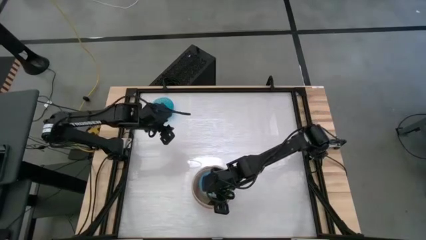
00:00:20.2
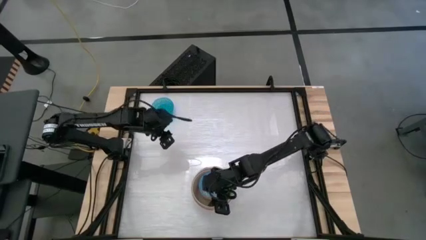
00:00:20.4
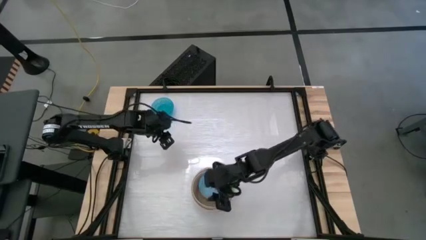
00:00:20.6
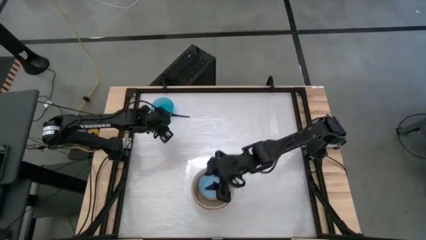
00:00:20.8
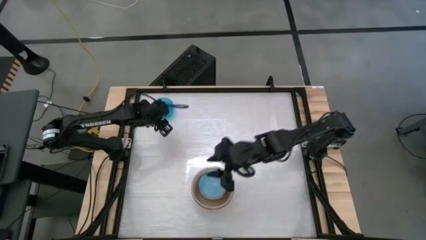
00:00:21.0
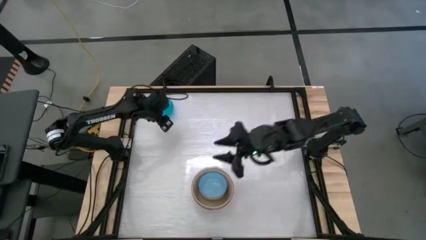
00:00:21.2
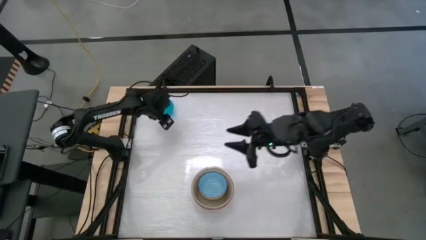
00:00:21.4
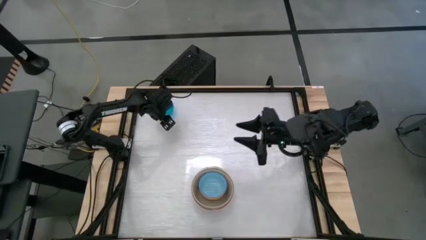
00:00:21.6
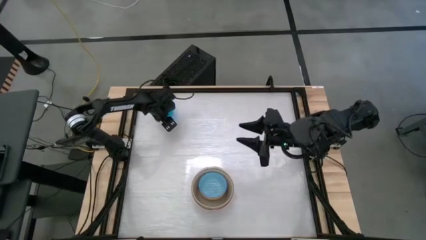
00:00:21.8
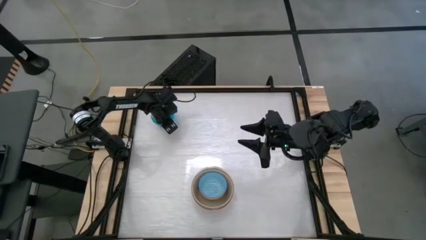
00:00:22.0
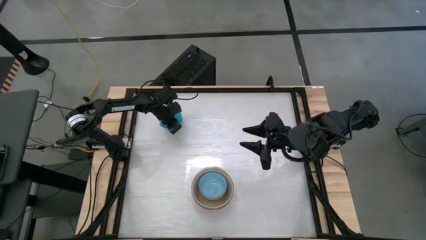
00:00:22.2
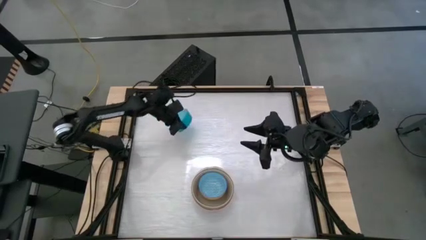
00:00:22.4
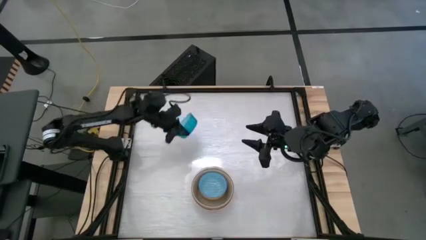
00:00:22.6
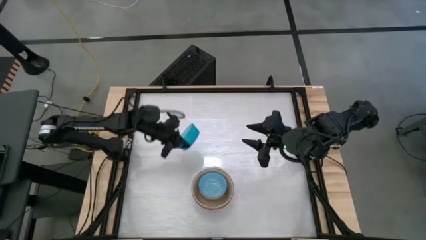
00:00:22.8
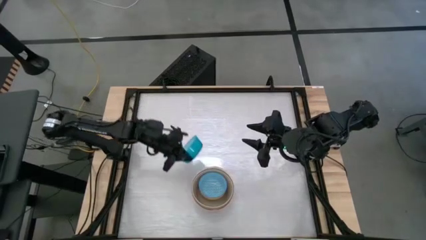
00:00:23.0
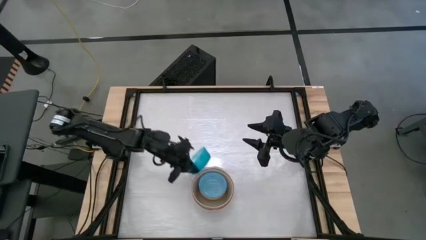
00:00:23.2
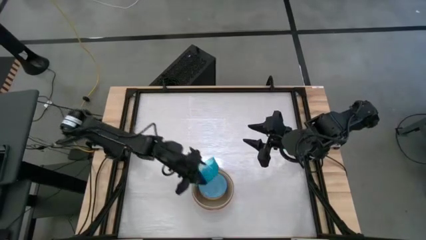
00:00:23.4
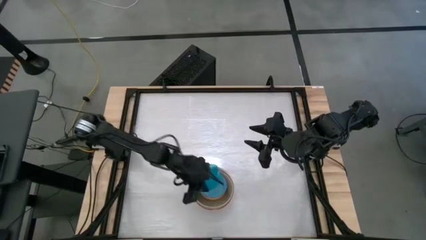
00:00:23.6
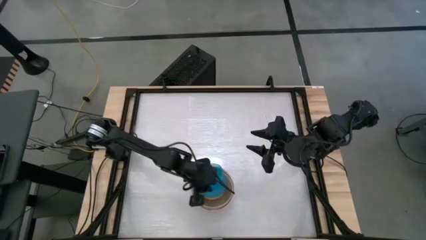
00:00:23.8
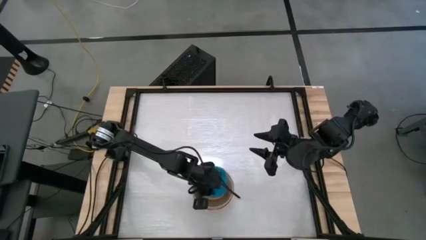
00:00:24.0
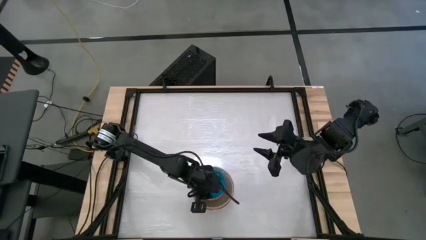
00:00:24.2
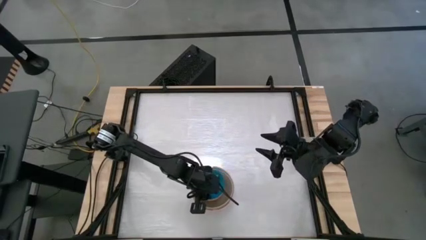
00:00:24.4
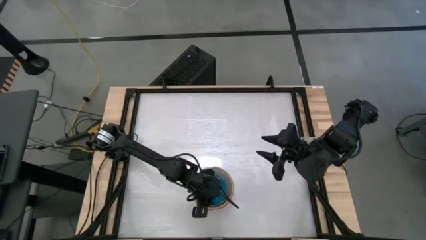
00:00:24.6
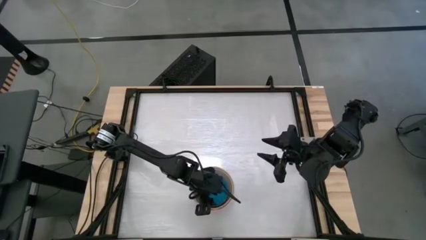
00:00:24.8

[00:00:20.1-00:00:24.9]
Stack the blue bowl on top of the blue bowl

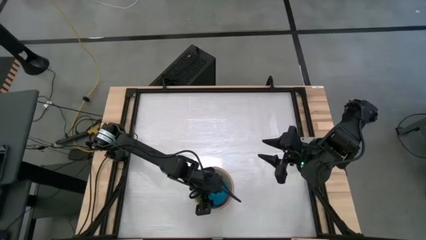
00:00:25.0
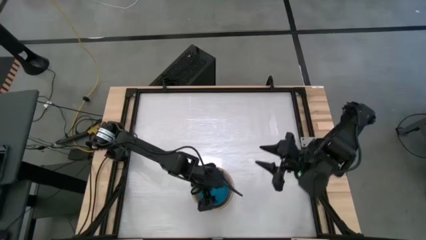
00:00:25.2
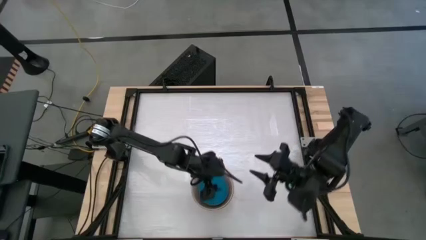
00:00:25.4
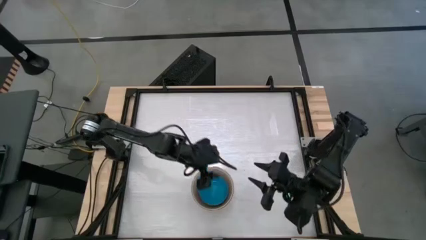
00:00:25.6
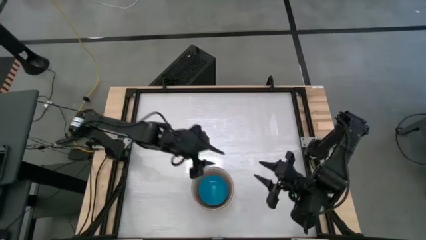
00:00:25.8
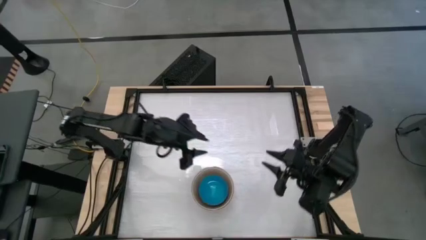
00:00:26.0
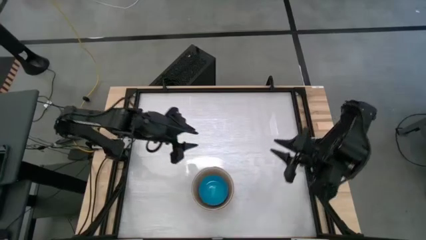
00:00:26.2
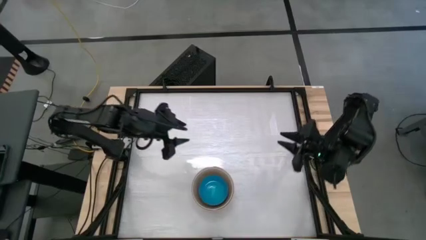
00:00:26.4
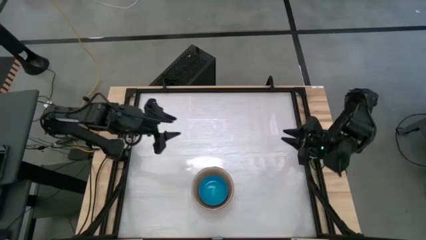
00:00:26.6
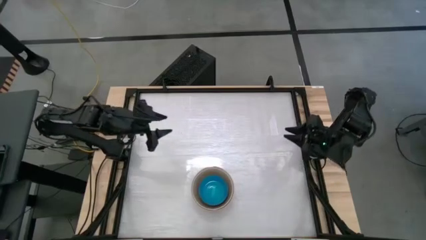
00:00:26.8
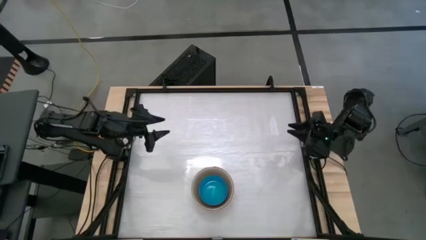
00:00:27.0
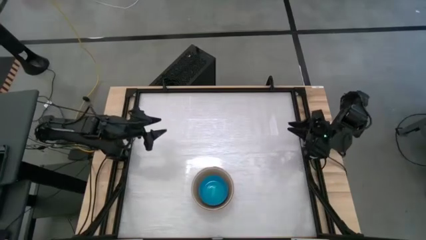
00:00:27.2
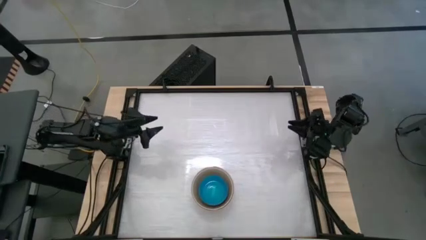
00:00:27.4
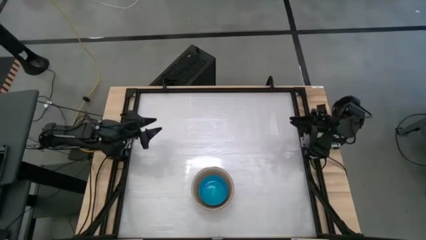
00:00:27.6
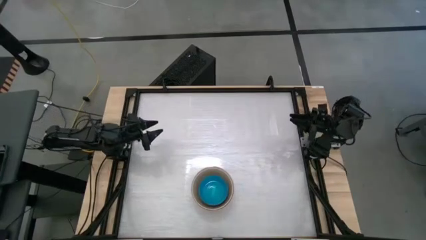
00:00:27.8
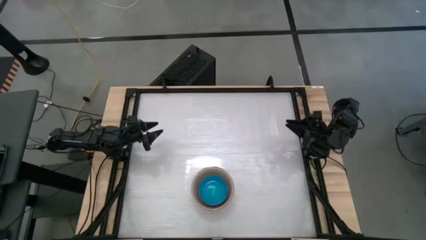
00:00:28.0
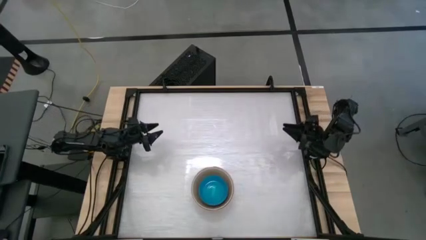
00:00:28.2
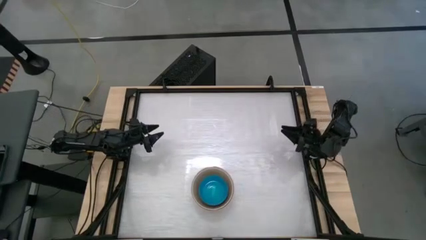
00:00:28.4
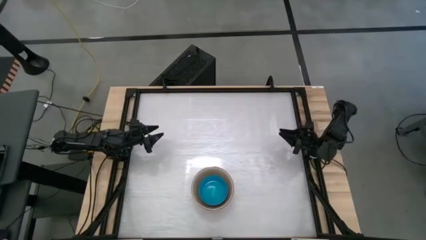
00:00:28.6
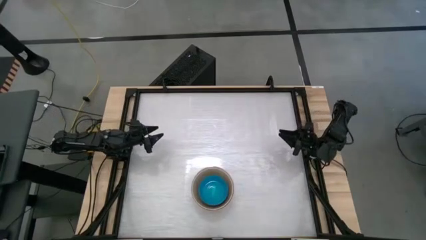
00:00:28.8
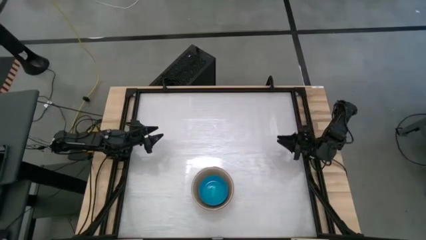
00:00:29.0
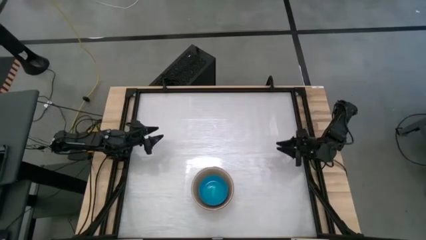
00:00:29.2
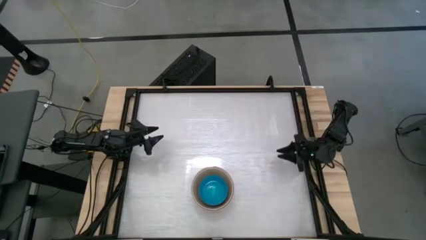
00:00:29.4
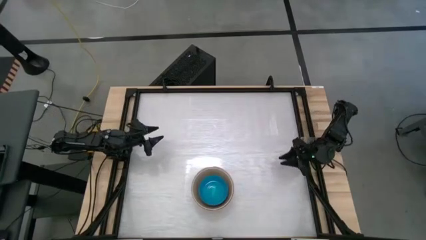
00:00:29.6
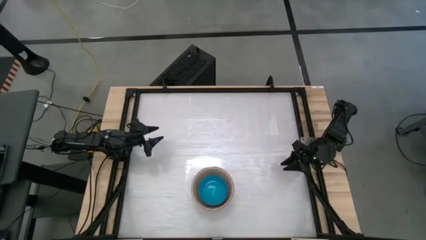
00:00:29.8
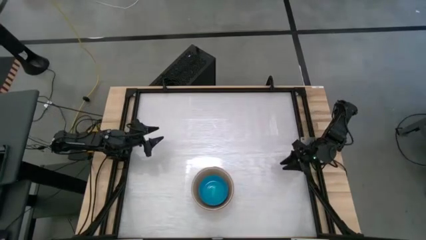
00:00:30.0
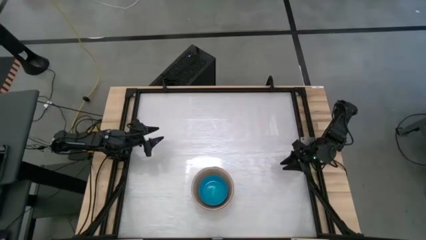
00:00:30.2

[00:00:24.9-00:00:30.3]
Return to Home Position

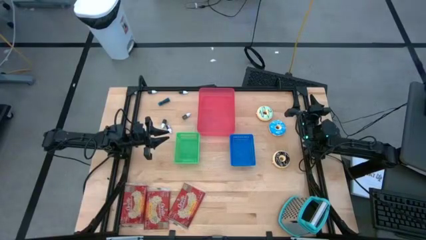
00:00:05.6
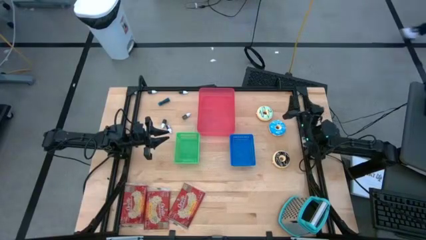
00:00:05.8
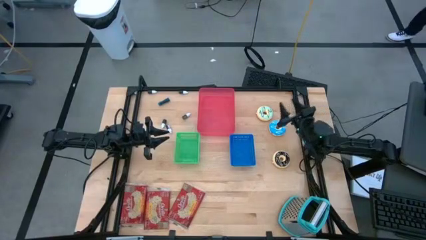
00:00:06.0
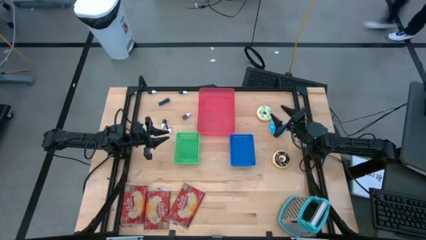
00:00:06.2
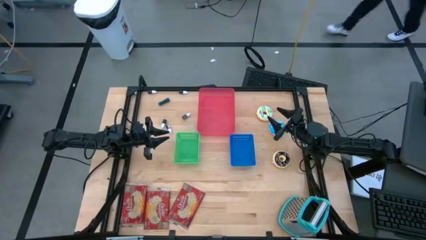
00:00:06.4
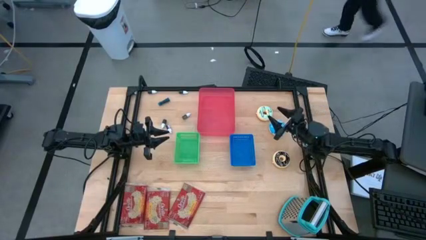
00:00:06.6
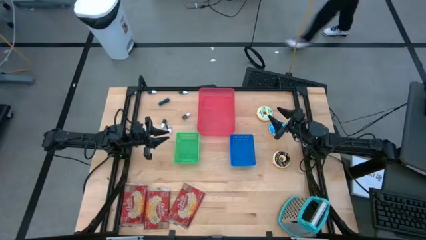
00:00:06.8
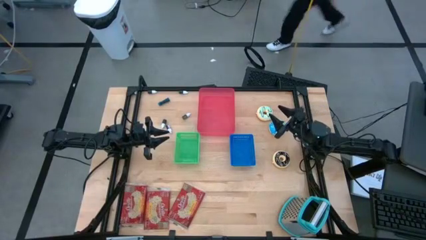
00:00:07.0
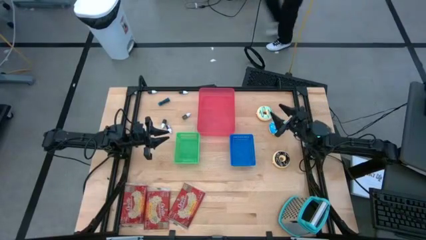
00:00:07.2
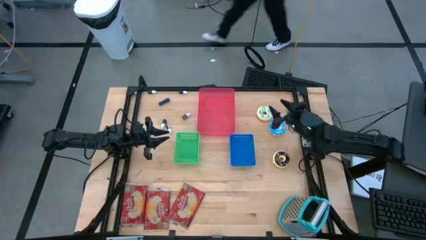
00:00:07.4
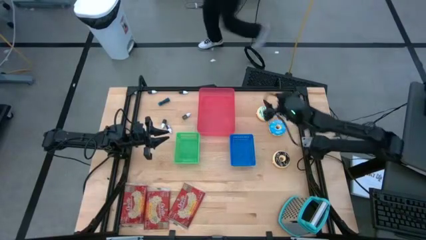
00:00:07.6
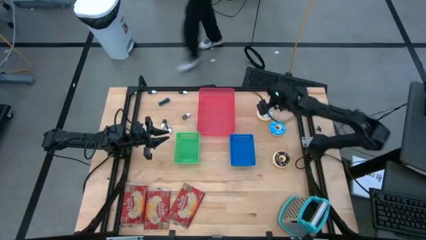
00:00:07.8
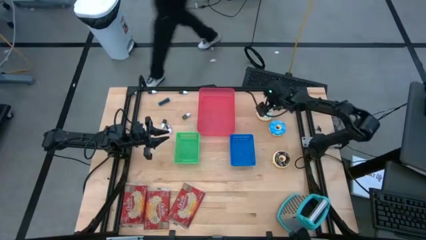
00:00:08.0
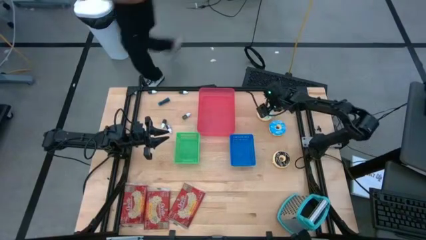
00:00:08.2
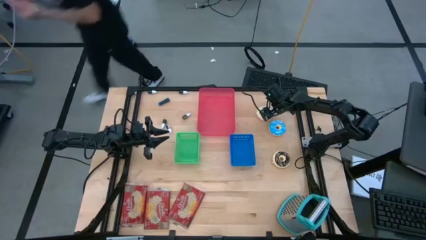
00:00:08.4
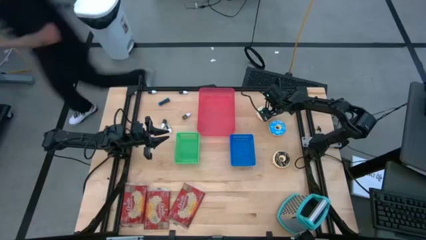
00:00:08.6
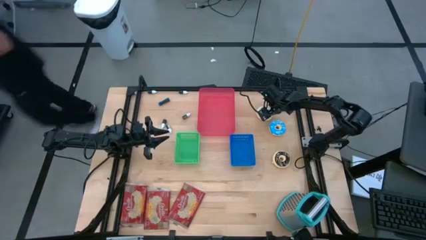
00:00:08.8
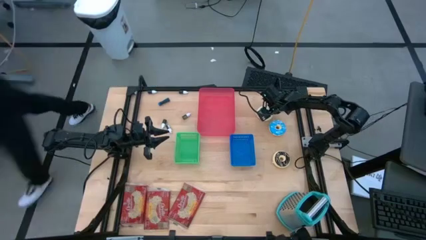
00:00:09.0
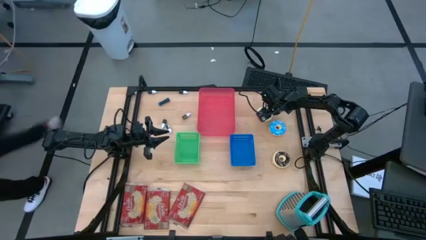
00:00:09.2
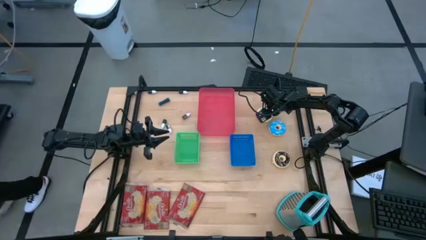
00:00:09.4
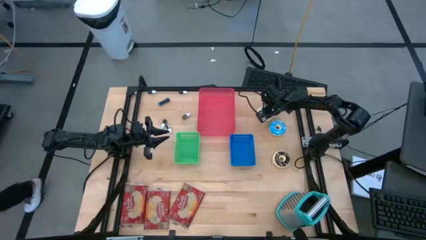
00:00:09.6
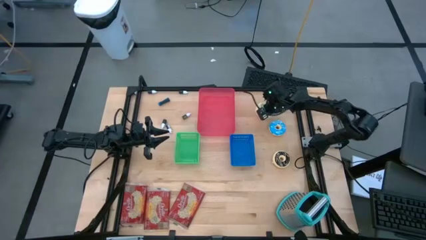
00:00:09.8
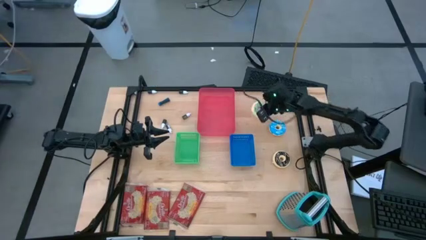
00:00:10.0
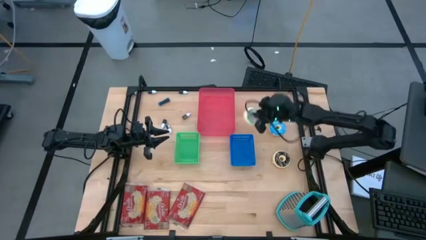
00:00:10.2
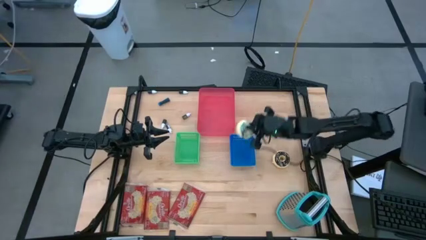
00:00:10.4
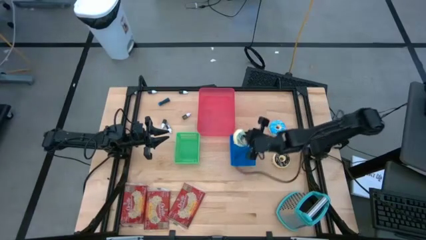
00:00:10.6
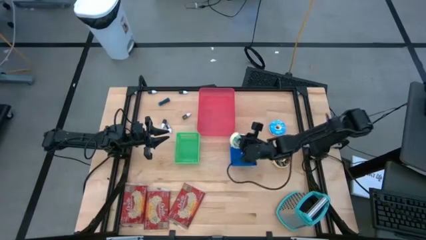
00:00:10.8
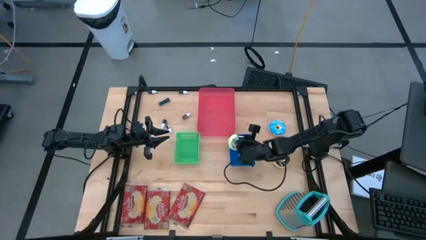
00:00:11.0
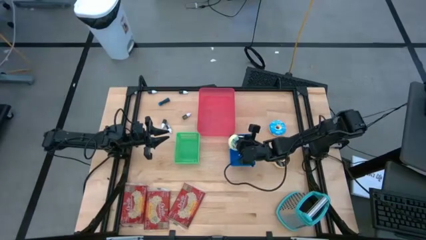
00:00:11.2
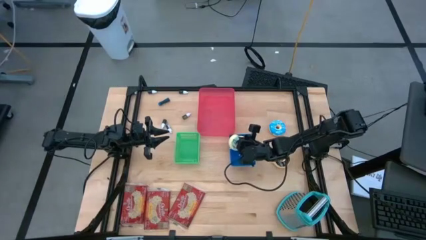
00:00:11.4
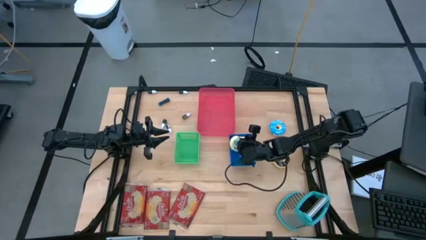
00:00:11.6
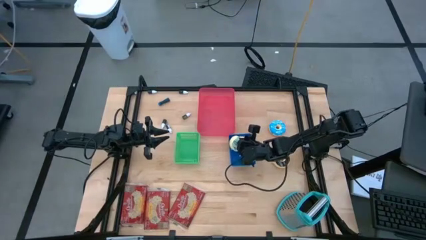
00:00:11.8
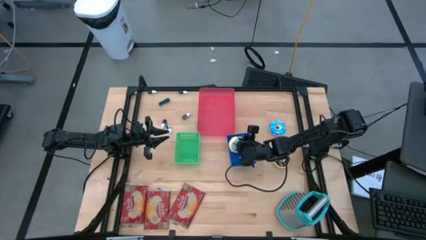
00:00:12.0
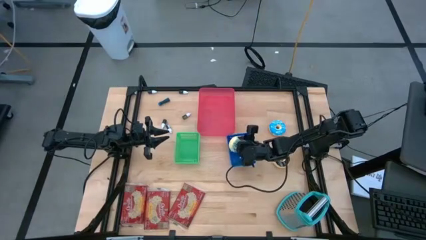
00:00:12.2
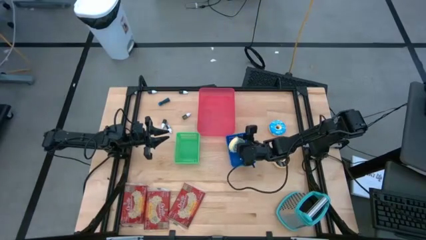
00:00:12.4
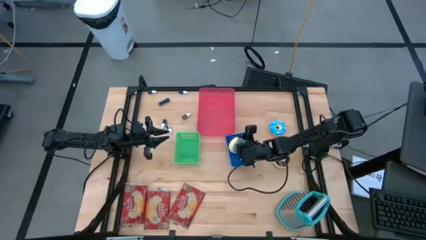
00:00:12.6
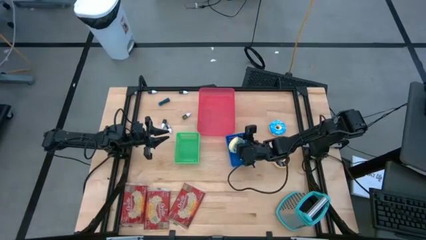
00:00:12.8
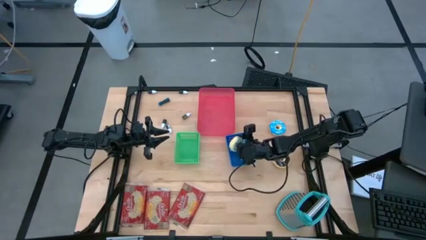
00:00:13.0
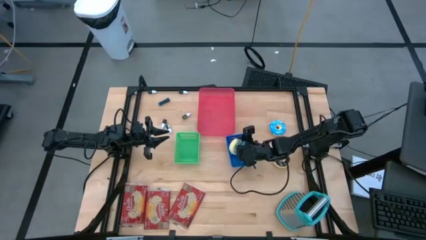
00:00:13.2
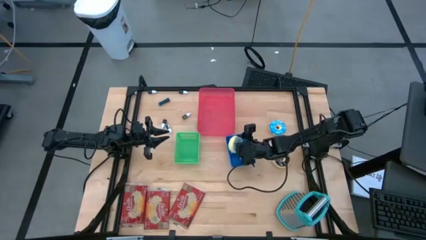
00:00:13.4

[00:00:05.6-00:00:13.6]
Put the light blue doughnut into the blue bin
